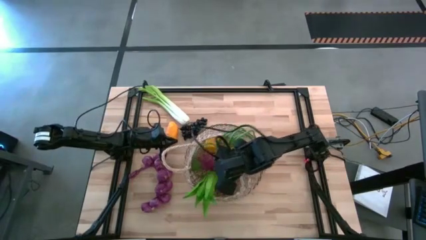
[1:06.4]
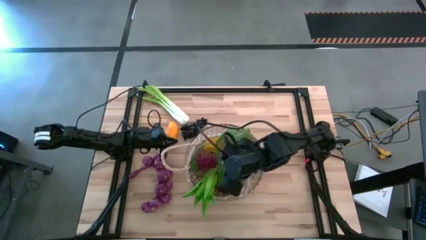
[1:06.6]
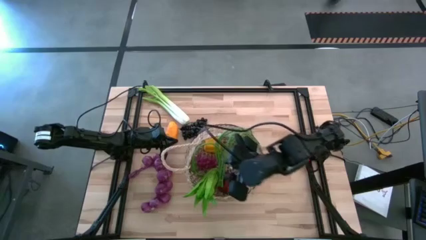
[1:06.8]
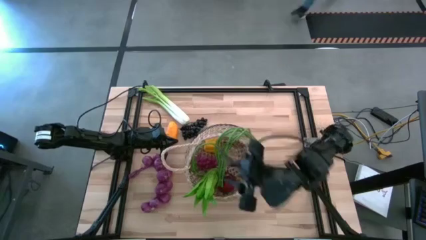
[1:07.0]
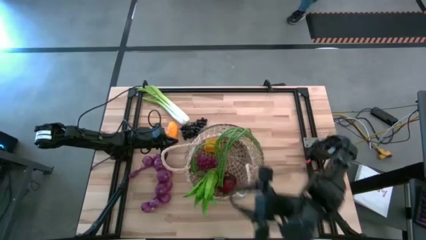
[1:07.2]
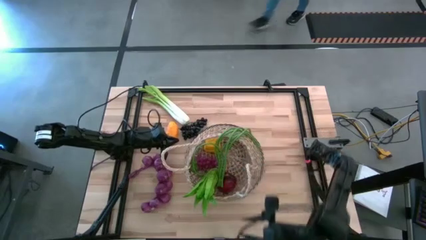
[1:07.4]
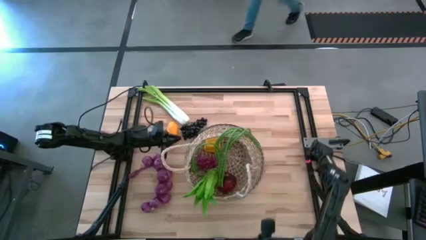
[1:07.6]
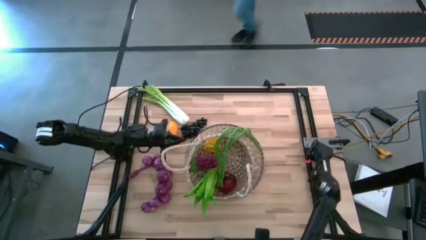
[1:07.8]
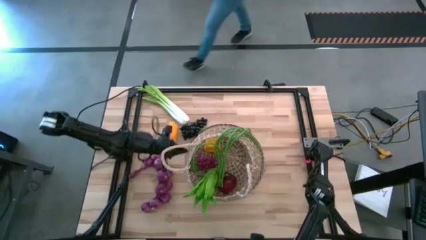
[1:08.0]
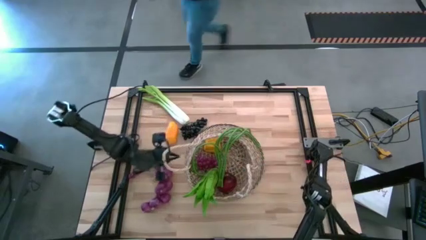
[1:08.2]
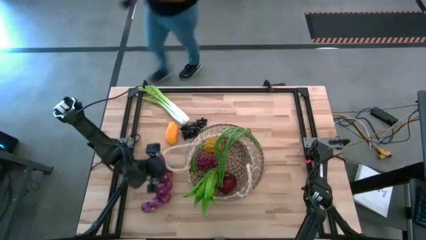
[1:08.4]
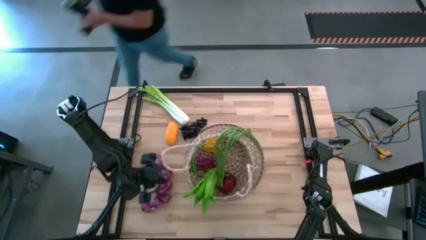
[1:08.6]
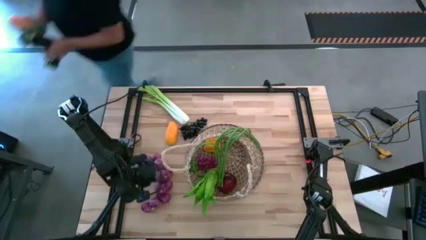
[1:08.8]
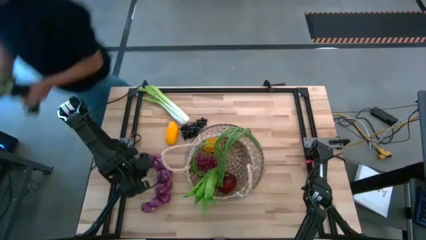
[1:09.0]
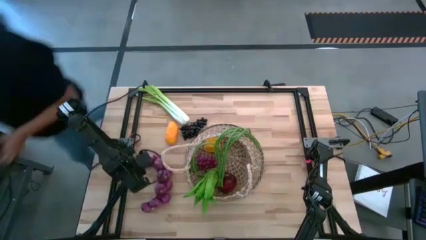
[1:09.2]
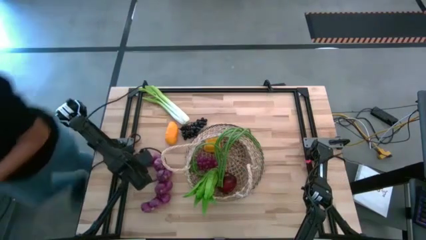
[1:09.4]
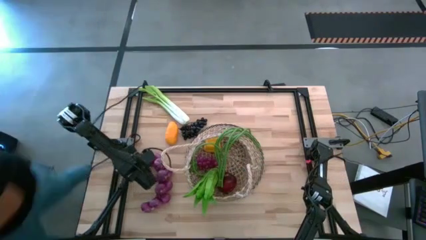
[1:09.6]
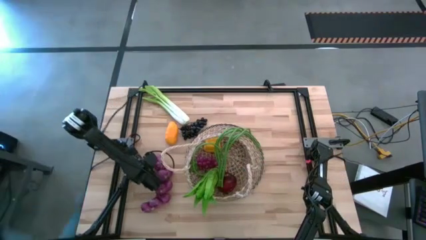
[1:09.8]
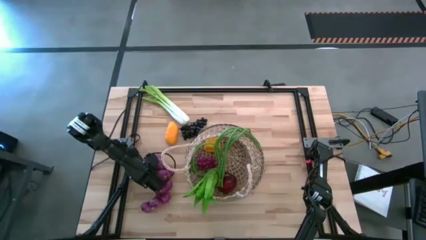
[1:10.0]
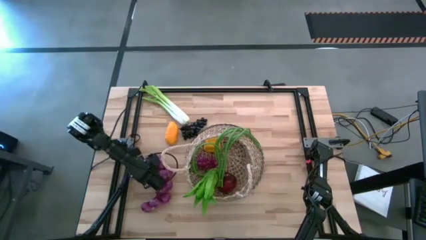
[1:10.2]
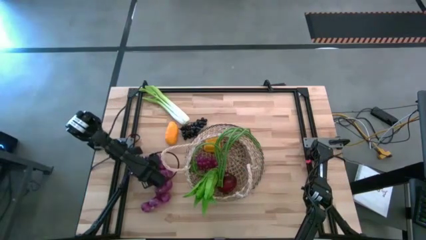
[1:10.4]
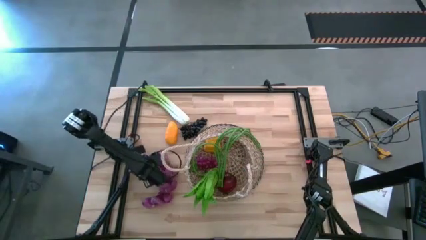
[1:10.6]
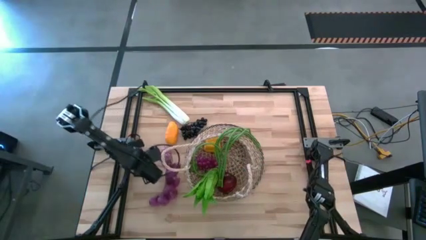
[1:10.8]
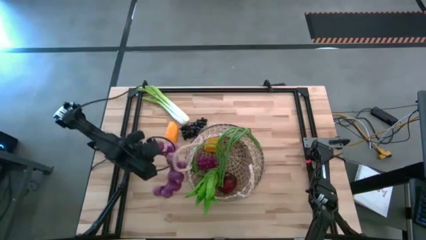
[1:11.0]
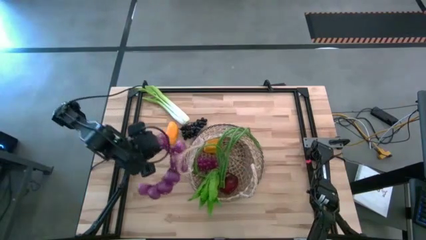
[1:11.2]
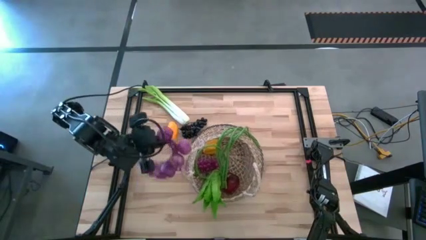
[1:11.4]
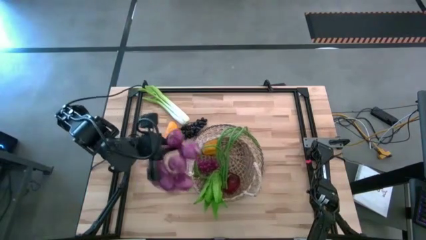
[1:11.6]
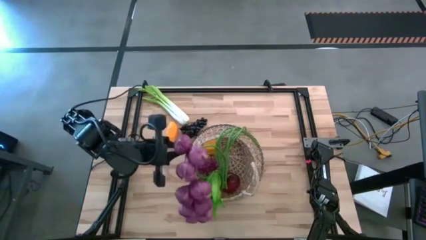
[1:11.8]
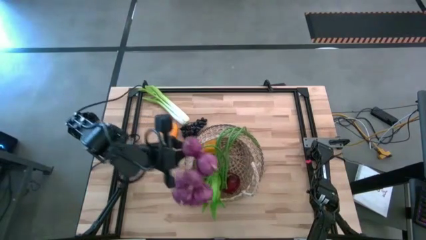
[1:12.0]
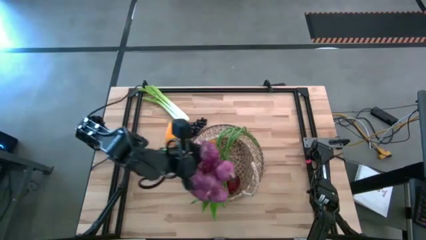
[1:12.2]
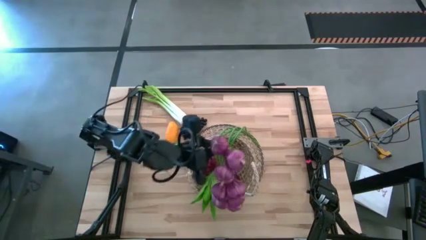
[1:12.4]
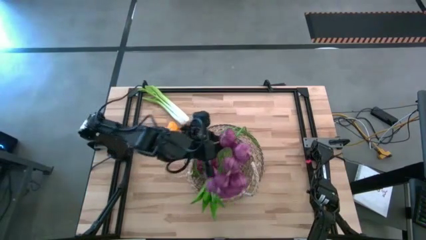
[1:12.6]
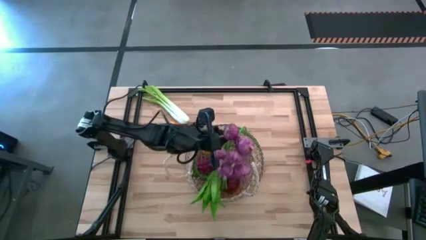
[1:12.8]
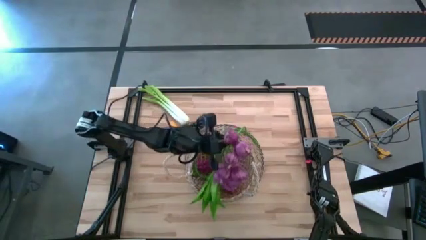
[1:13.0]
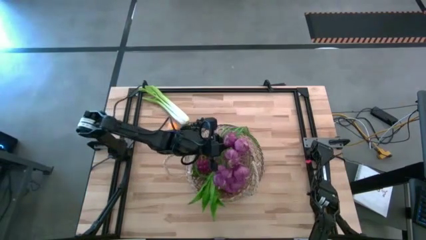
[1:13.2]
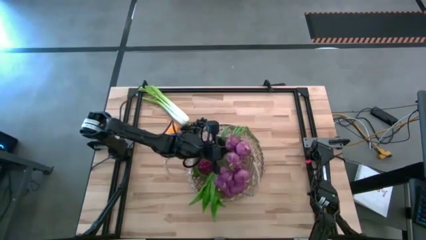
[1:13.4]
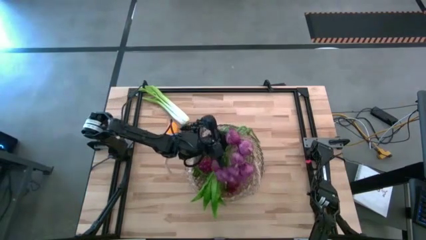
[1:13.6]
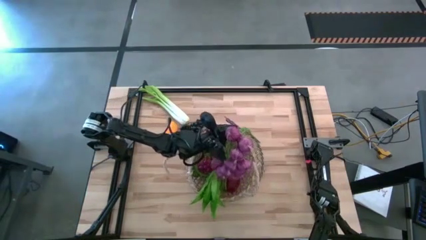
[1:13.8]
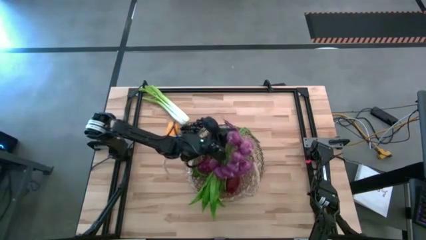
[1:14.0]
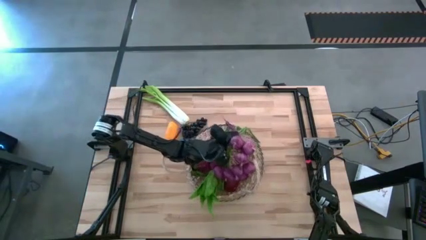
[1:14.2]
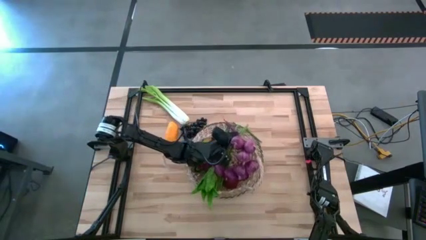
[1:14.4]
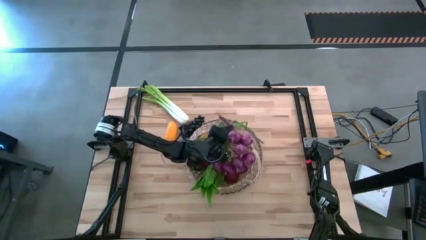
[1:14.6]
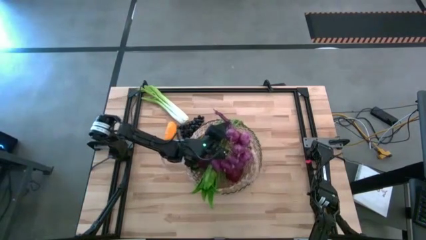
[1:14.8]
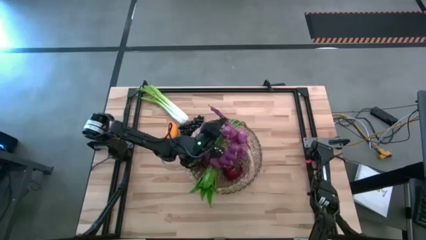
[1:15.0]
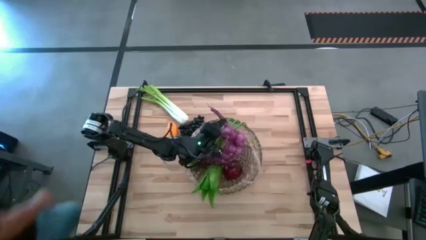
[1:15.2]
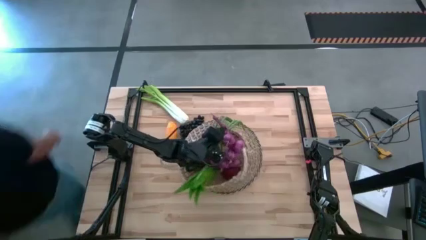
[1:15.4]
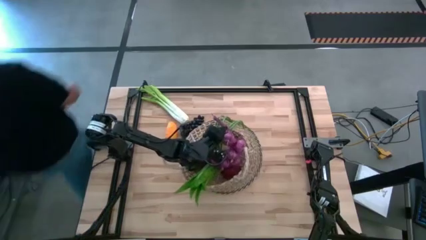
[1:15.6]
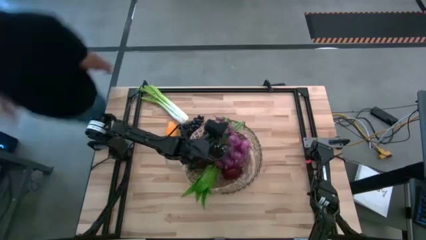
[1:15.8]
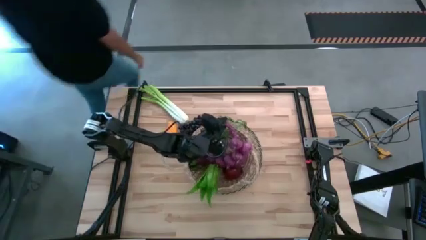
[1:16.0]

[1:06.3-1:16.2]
Task: Build produce basket
Put the onions into the basket

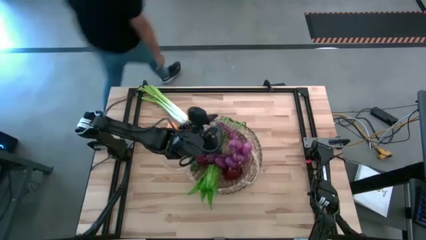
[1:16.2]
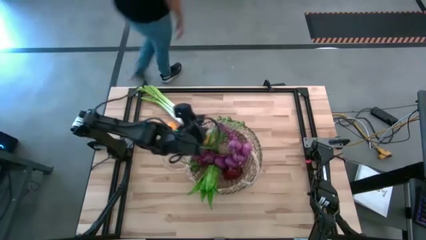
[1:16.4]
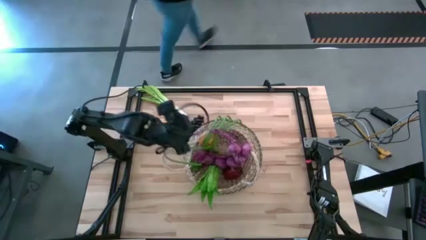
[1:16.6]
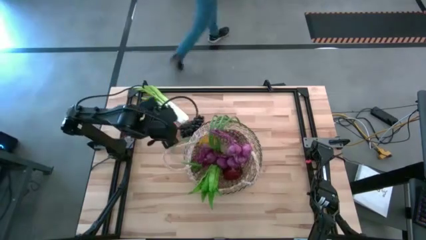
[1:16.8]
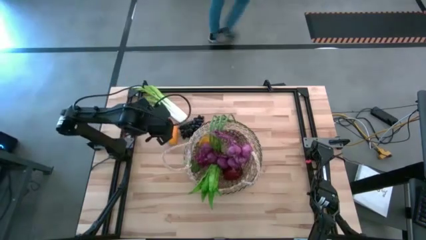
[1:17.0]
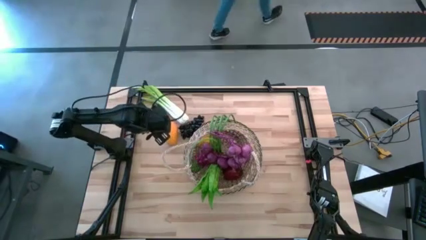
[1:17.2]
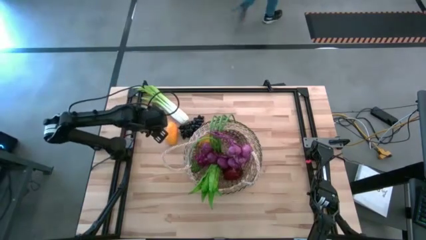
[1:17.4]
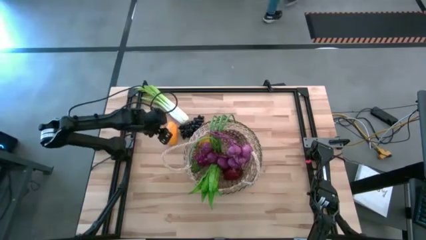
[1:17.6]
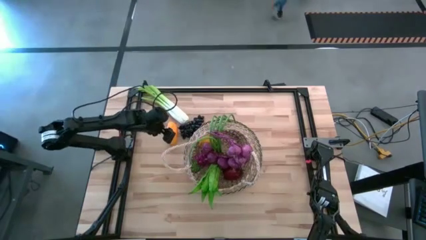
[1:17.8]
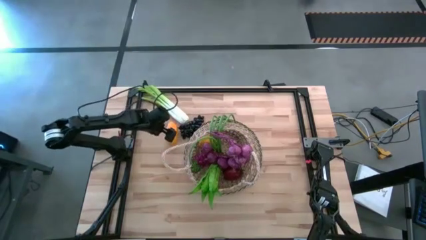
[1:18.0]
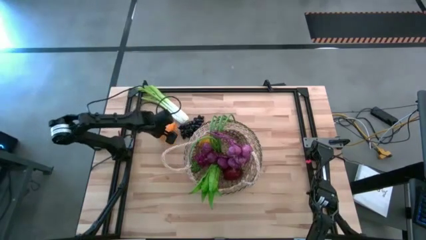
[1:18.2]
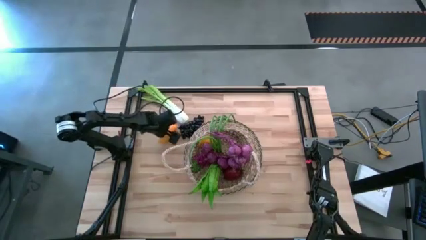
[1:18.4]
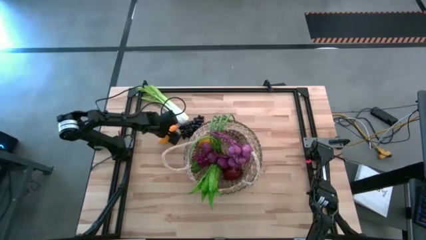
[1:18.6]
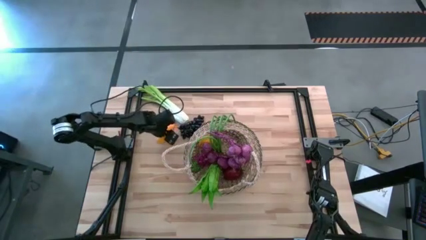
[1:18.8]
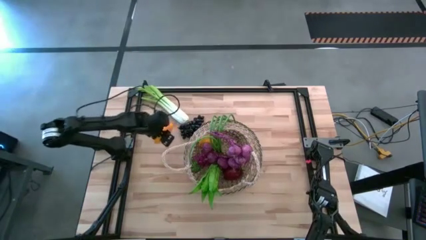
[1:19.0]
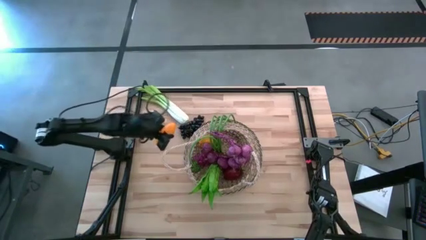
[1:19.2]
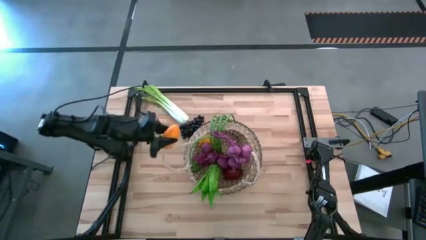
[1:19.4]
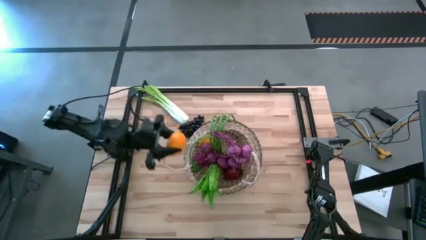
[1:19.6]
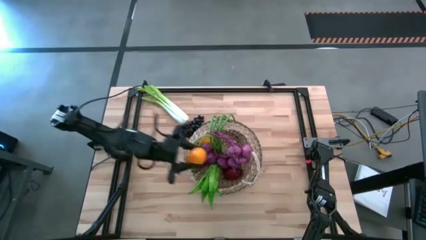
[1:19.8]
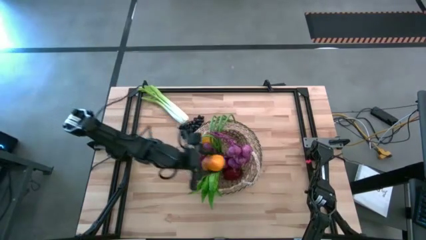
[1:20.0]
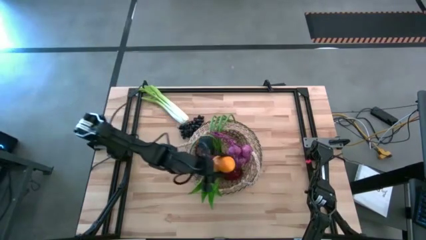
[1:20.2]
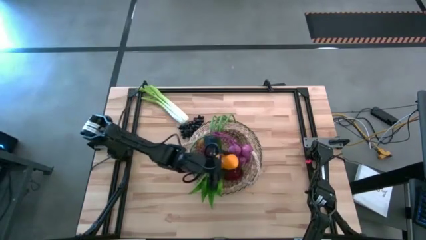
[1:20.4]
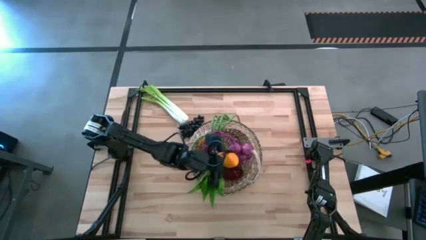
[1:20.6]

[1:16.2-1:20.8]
Put the mango into the basket

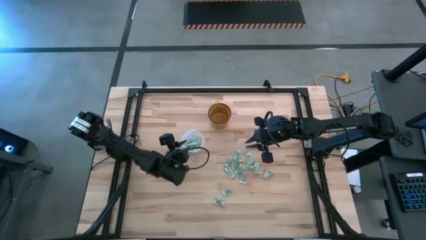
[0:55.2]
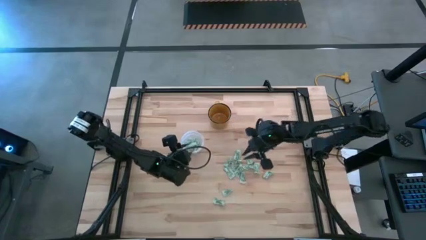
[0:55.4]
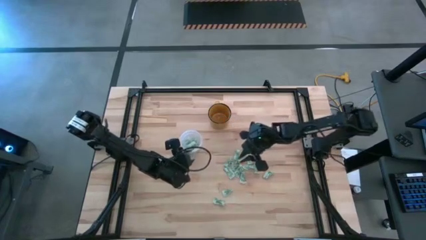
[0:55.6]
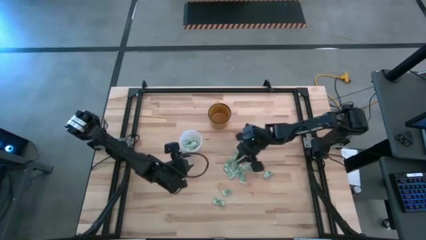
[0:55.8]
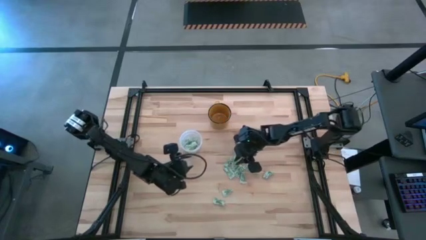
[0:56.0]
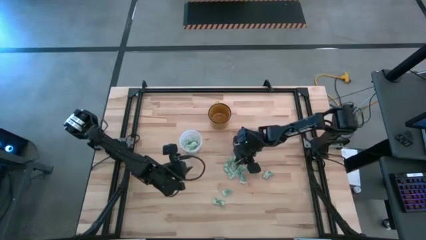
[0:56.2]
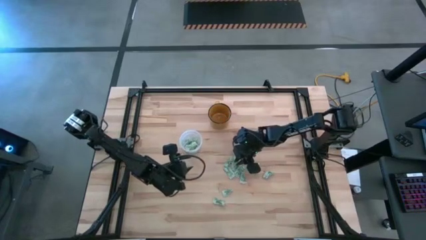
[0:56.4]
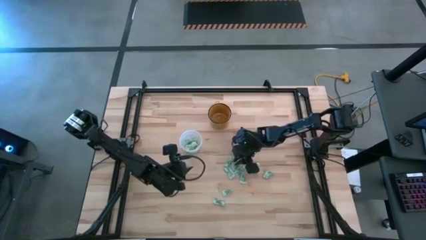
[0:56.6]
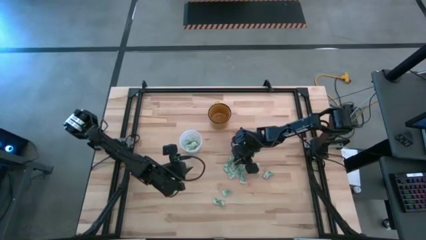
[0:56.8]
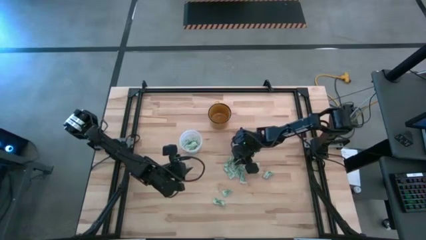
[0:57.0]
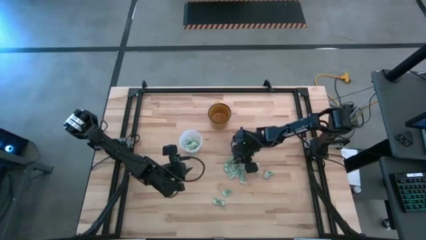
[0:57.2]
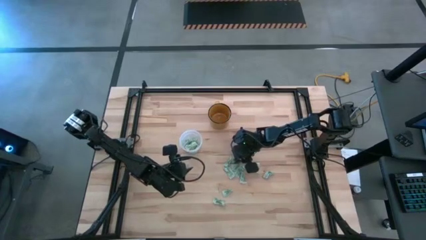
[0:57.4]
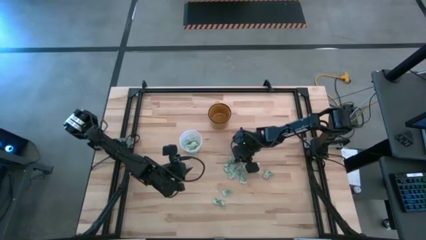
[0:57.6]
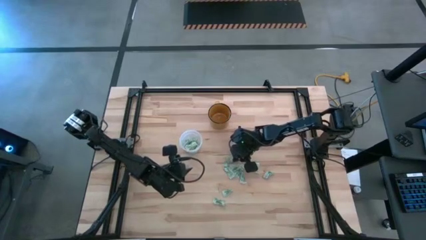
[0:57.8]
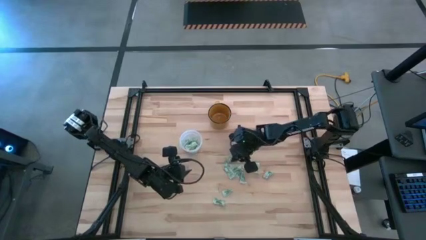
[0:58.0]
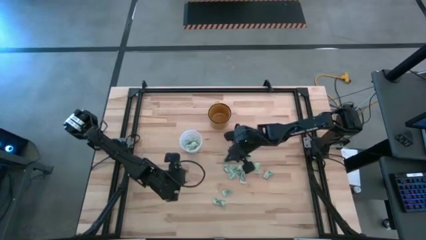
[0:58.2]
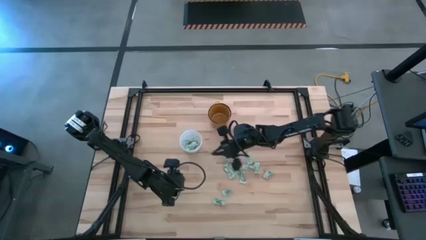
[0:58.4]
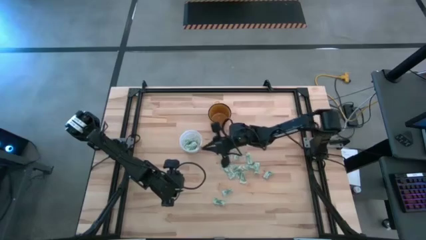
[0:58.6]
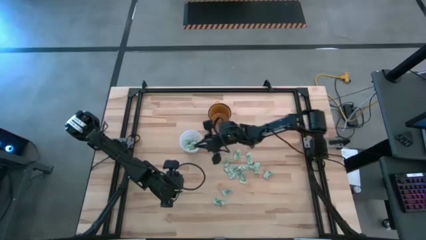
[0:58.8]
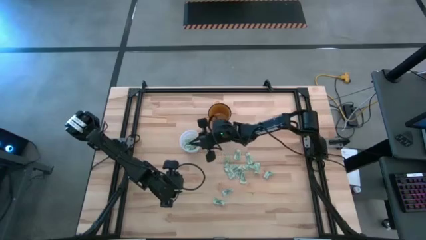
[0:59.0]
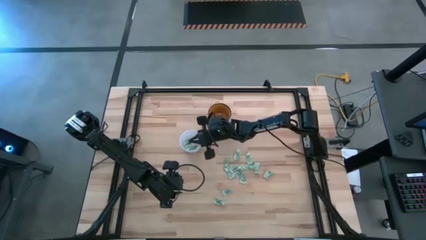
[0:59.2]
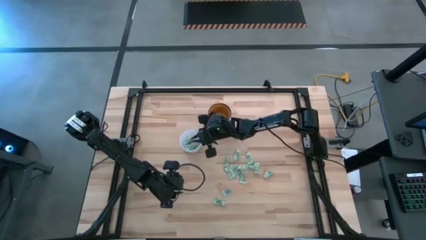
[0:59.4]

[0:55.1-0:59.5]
Task: Pick and place Stevia / Truvia into bins
Put the stevia packet into the transparent bin
